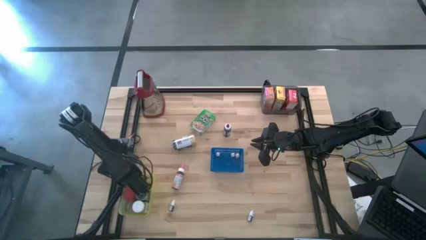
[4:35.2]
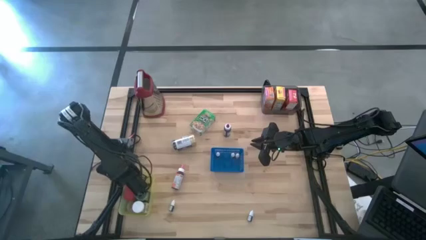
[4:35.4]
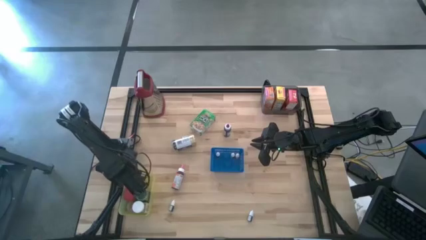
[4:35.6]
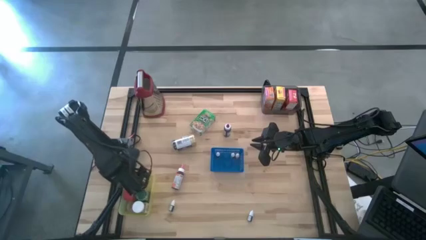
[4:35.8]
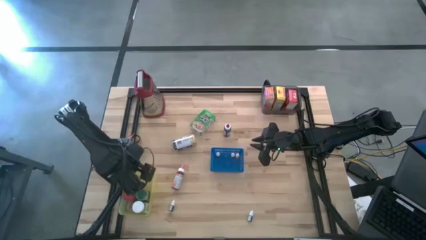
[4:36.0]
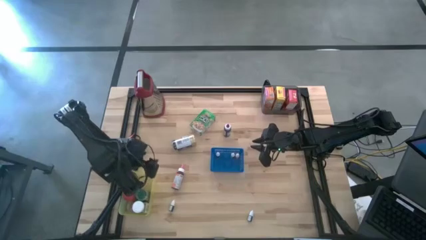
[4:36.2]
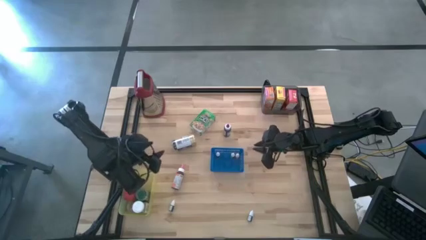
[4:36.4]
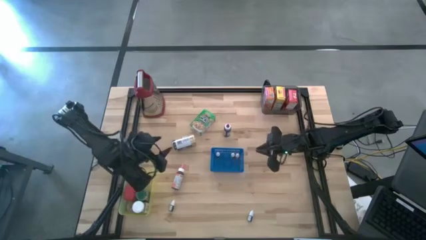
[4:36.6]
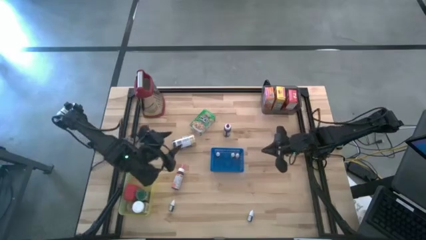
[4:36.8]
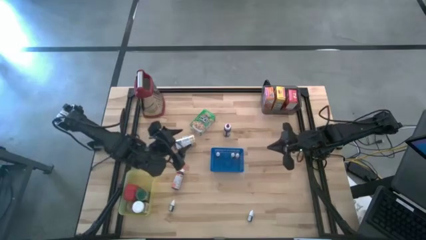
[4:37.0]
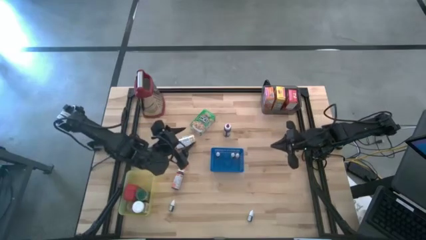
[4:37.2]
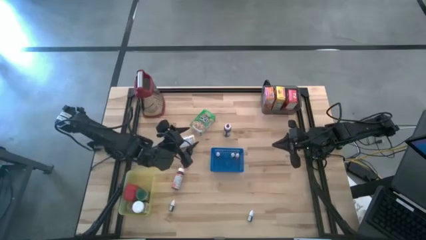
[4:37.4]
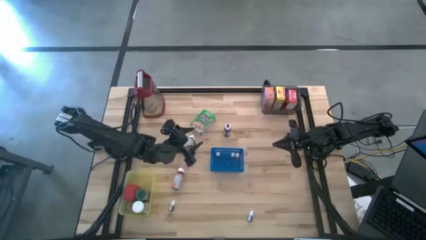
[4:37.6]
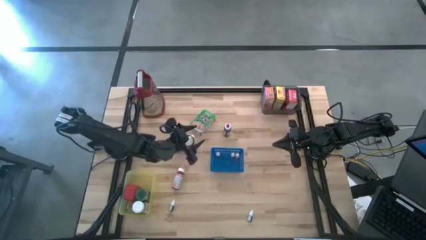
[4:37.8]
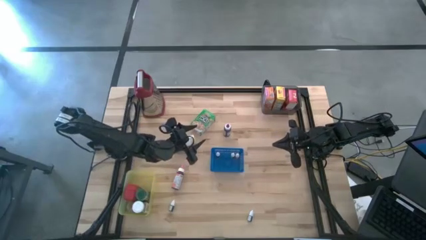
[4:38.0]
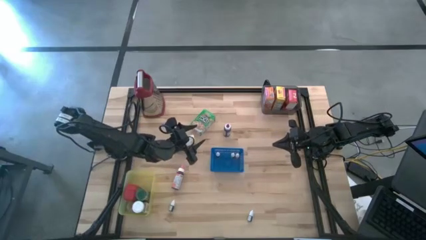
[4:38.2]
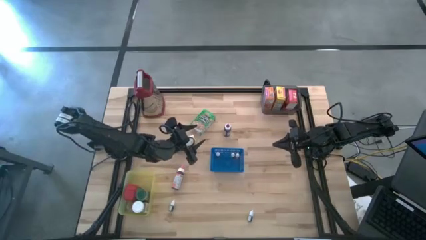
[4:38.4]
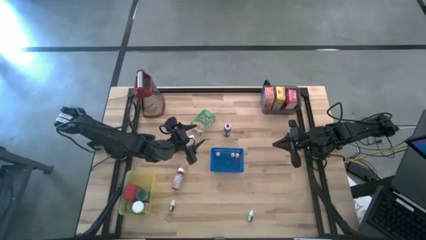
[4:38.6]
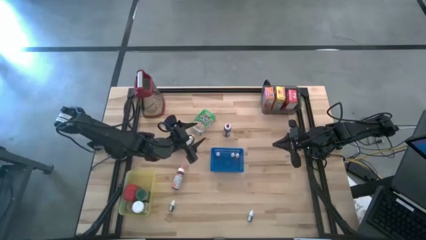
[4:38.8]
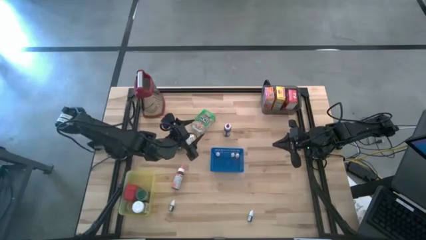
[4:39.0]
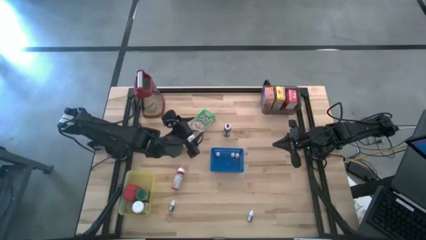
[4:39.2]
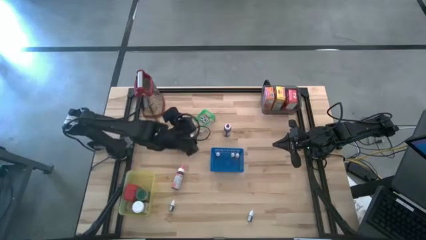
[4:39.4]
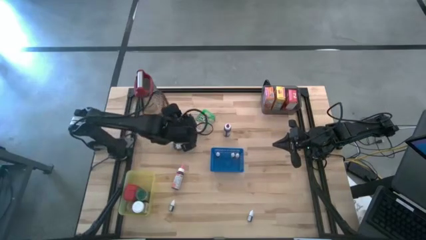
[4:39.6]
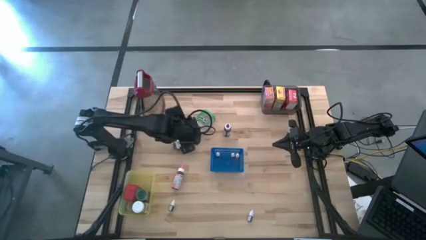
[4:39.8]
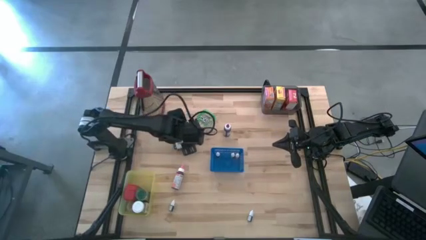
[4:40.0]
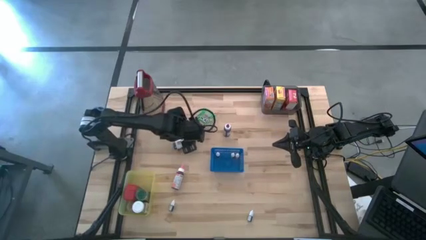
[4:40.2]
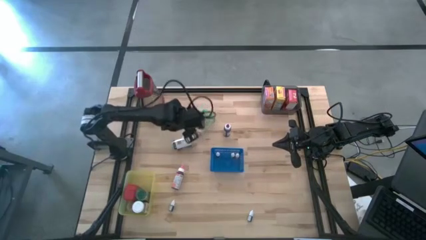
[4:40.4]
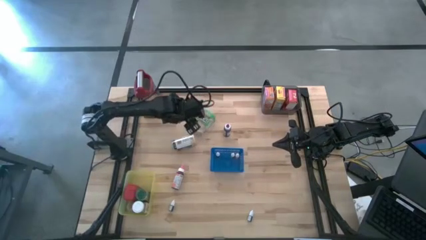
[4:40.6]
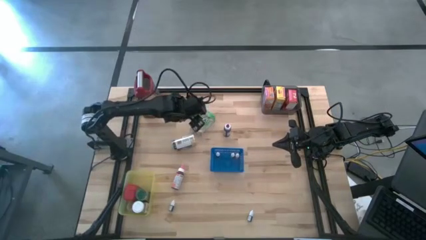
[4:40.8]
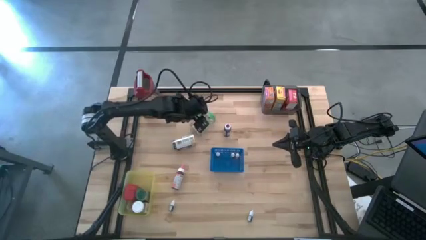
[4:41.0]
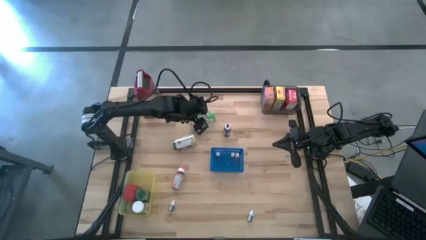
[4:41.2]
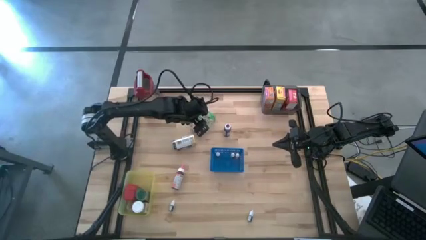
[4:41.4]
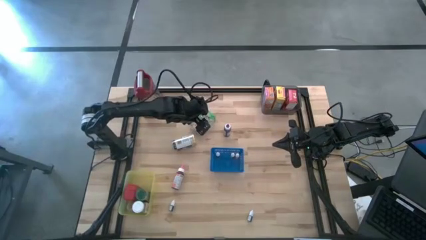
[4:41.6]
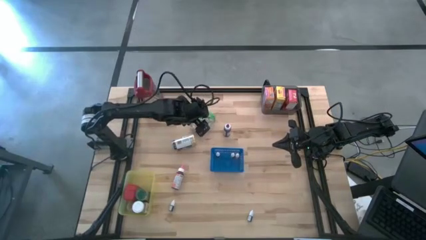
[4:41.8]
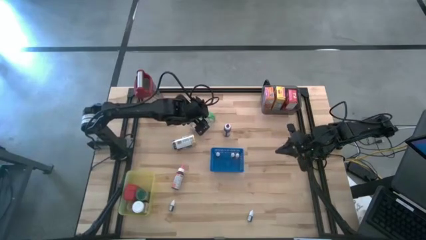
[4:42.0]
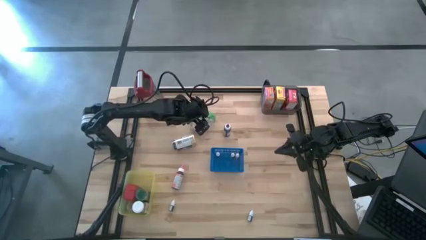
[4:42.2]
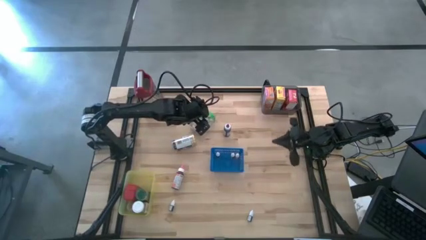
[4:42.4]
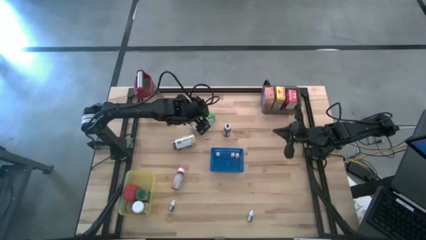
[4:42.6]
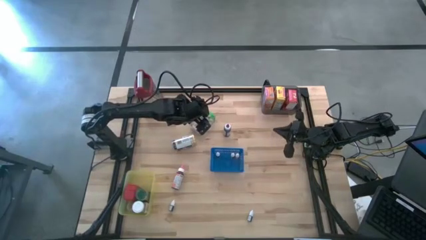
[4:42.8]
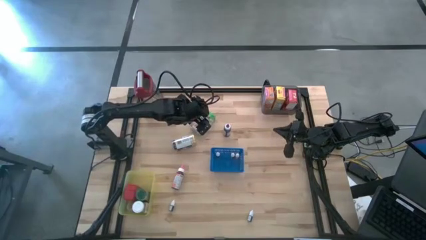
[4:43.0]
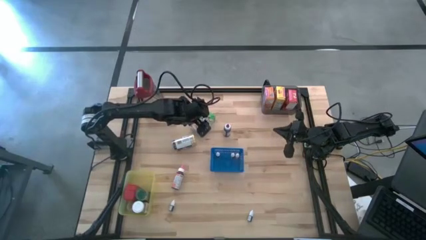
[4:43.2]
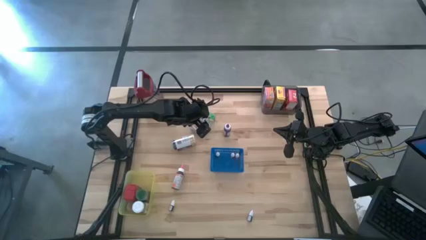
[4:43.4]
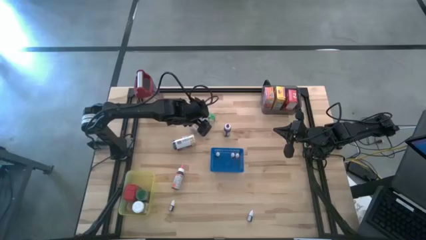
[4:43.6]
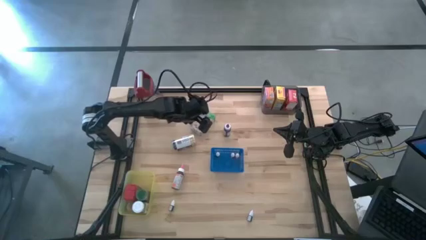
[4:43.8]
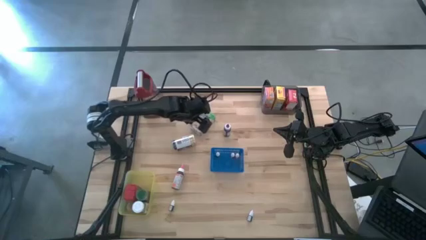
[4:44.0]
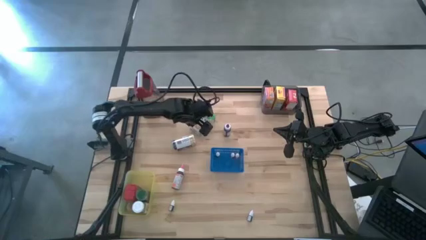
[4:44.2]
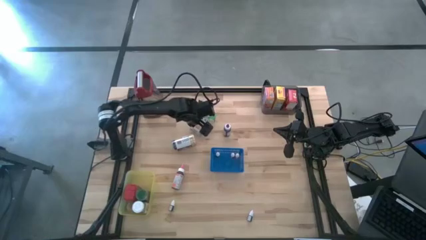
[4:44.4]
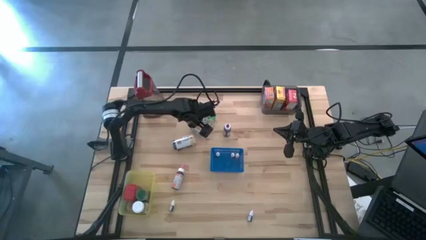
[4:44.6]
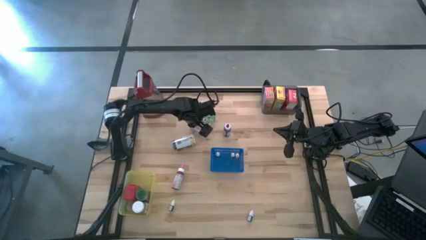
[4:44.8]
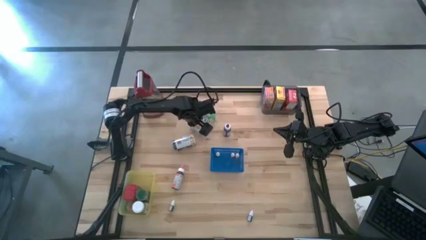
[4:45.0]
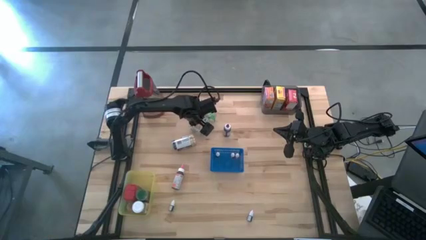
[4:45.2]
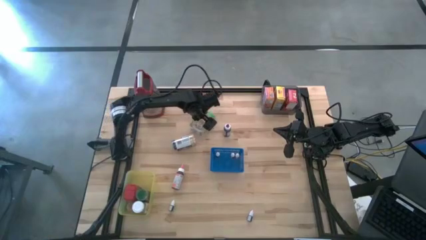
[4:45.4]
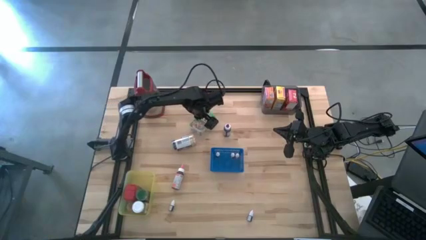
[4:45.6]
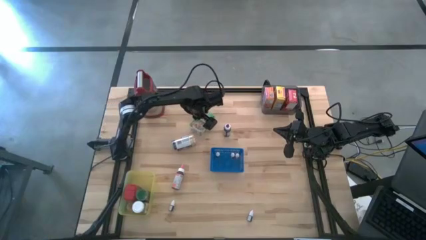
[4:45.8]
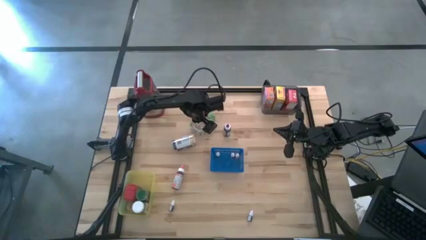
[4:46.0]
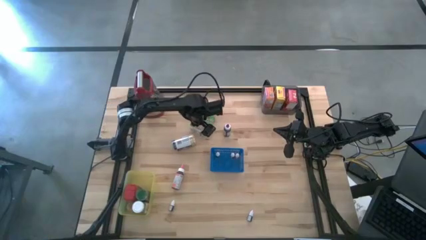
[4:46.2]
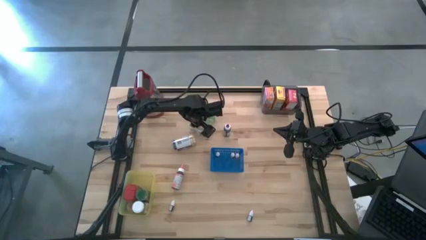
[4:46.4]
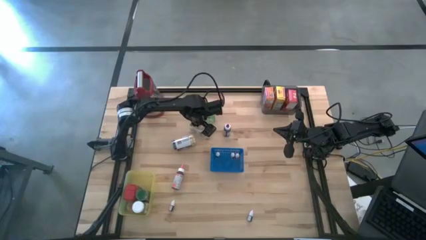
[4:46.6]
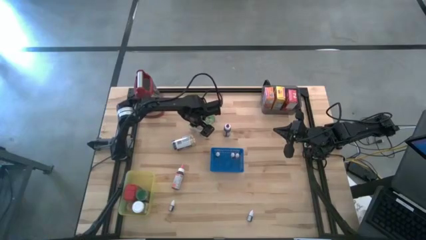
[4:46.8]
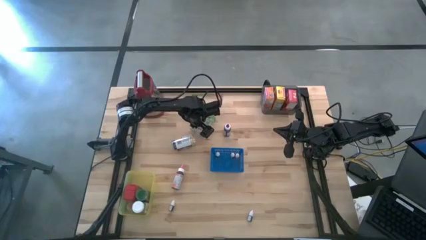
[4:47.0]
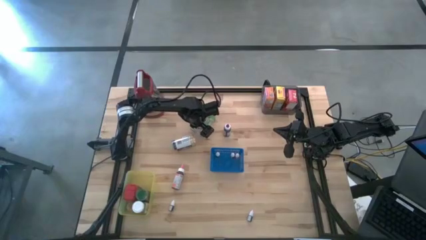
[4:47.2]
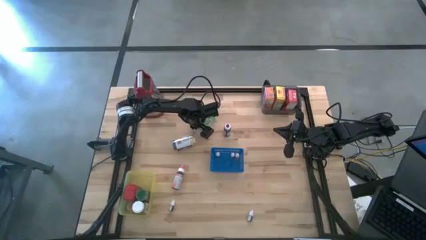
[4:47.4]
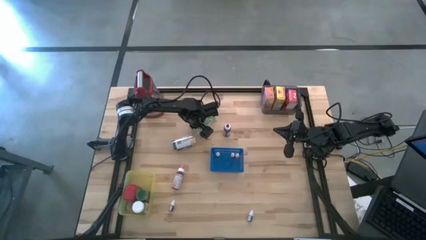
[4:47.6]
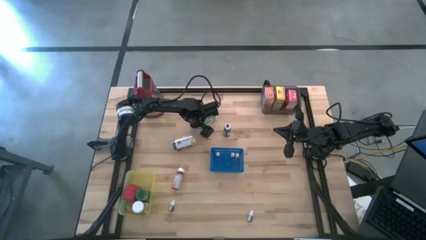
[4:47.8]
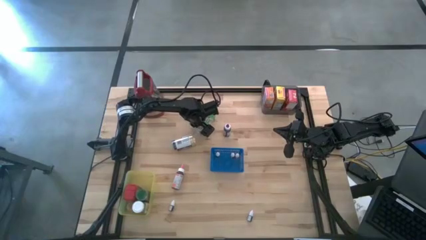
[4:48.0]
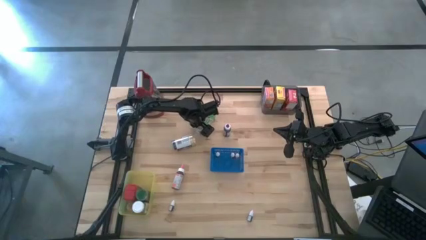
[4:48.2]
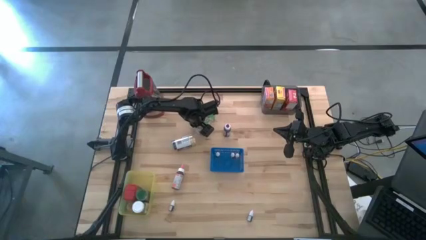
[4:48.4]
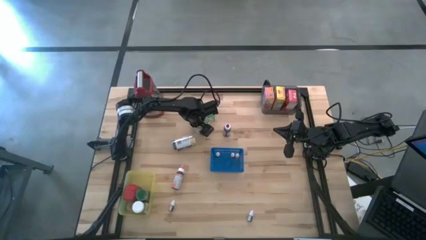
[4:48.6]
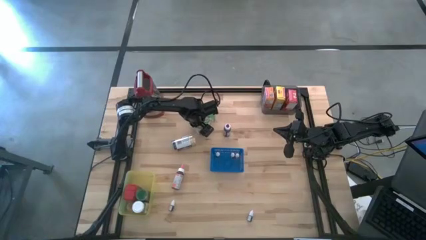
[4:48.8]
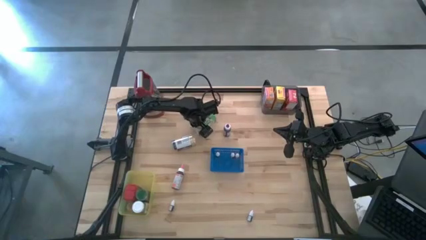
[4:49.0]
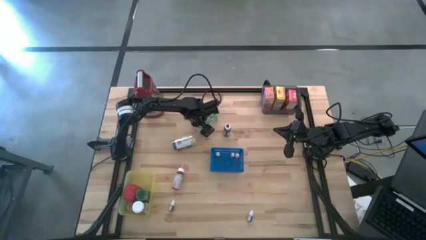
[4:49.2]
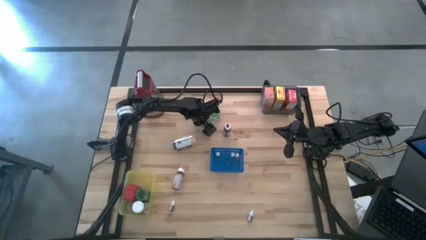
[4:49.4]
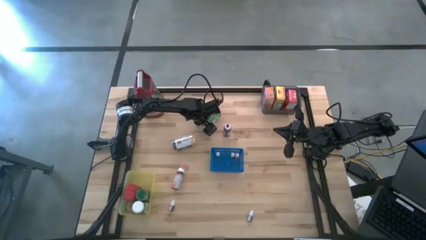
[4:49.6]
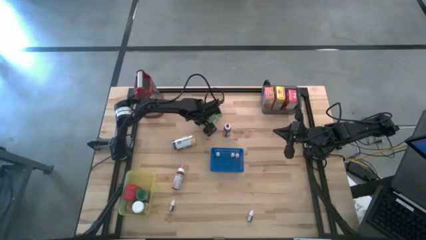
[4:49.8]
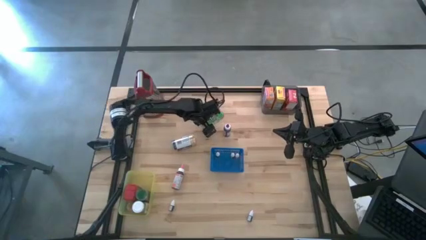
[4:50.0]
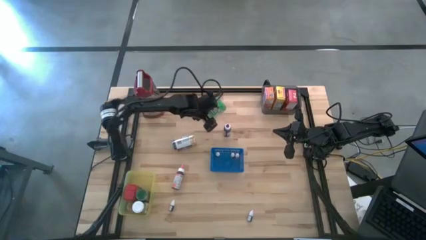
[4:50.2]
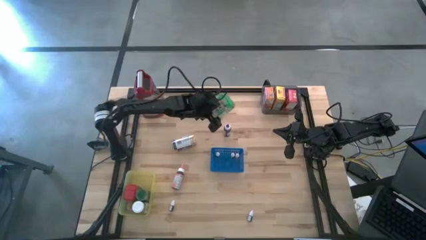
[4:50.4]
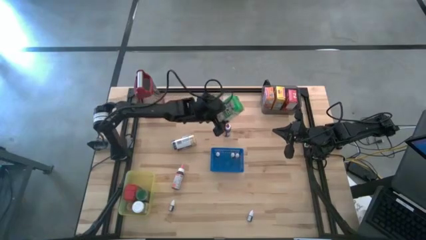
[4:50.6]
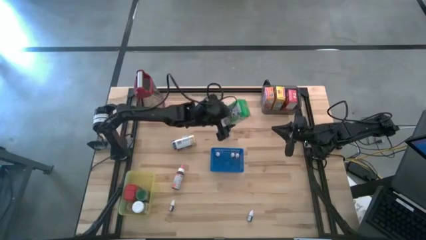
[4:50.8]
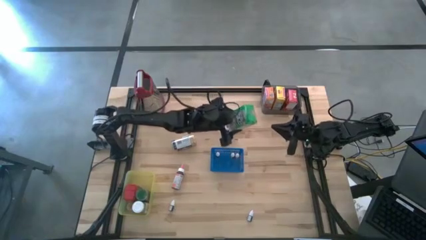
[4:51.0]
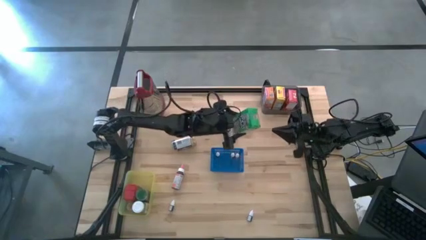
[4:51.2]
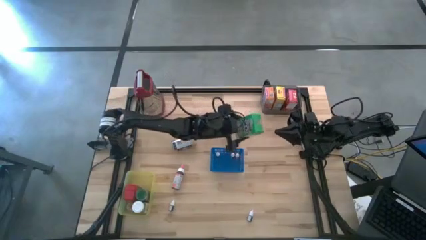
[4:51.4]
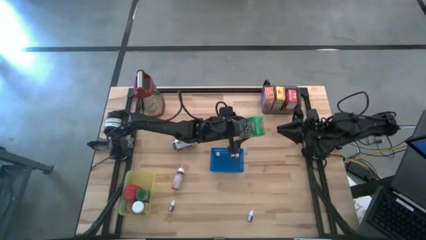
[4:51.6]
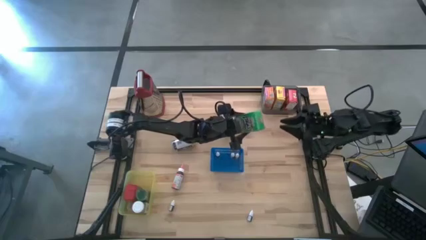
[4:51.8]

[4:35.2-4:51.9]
Task: Pick & Place Kitchen Items
Put the green cereal box into the black bin
